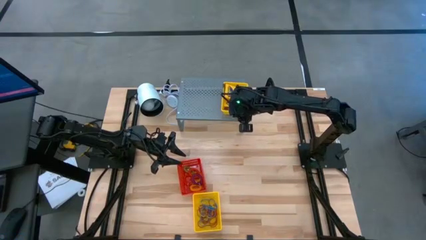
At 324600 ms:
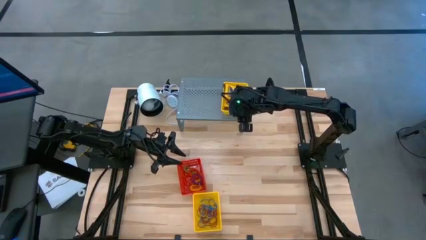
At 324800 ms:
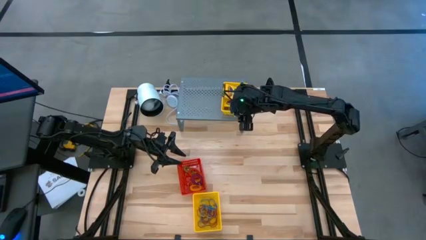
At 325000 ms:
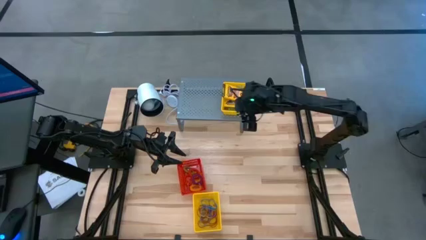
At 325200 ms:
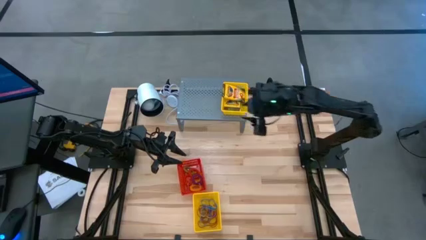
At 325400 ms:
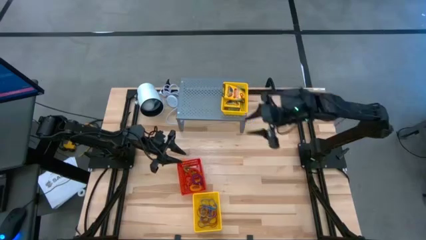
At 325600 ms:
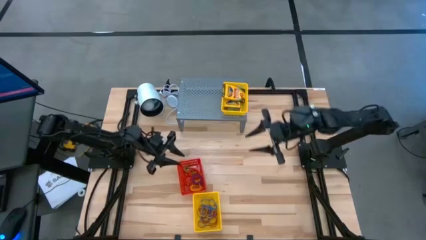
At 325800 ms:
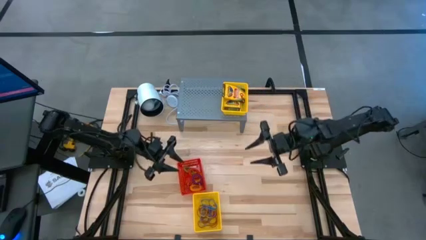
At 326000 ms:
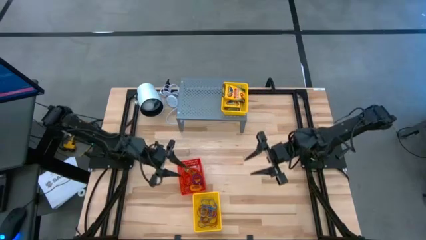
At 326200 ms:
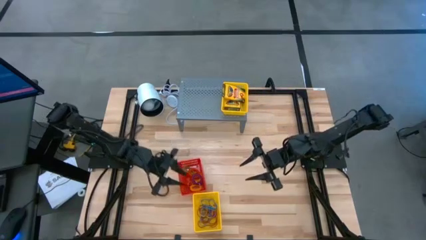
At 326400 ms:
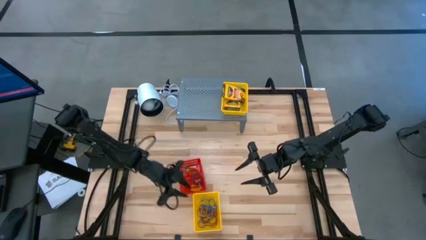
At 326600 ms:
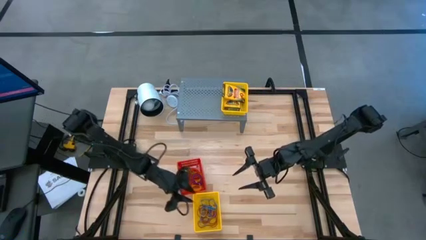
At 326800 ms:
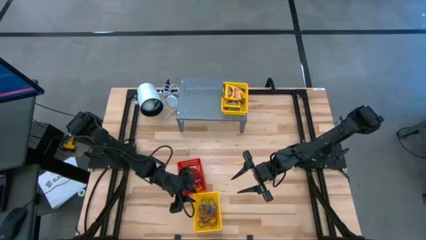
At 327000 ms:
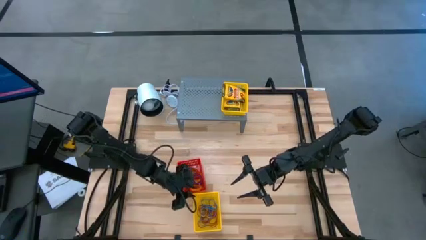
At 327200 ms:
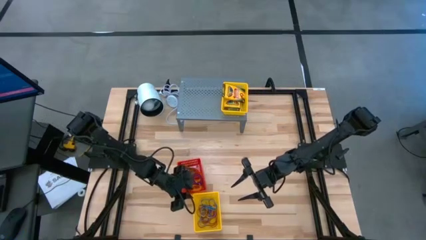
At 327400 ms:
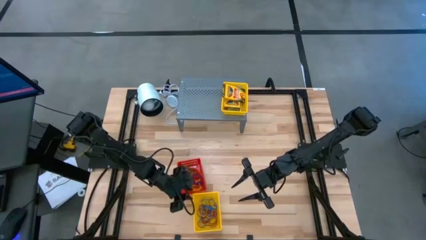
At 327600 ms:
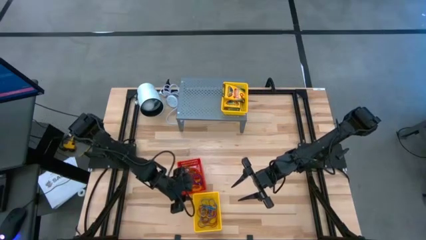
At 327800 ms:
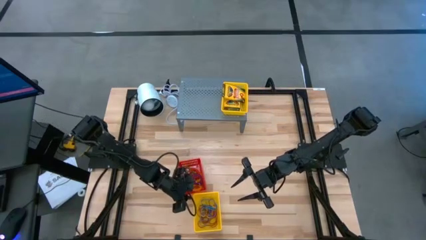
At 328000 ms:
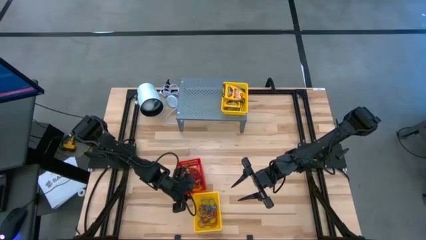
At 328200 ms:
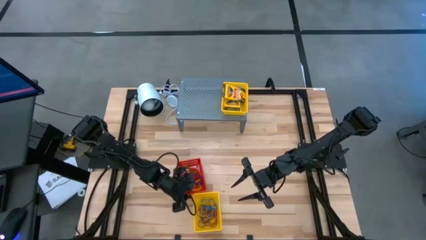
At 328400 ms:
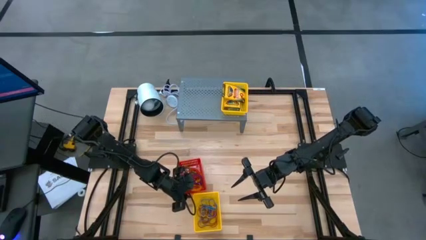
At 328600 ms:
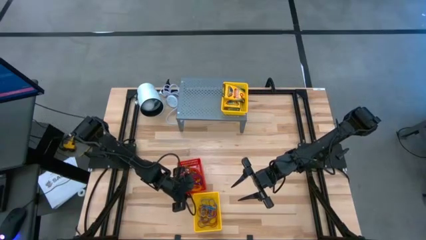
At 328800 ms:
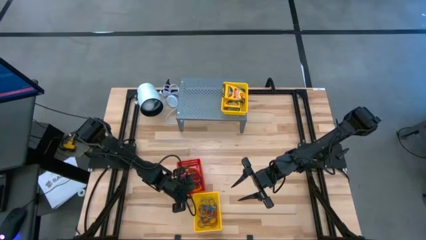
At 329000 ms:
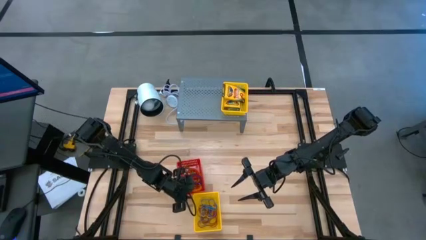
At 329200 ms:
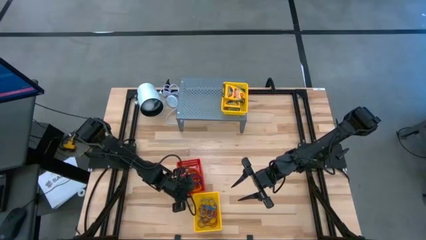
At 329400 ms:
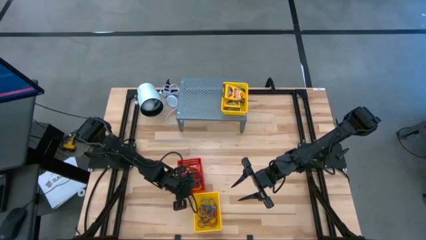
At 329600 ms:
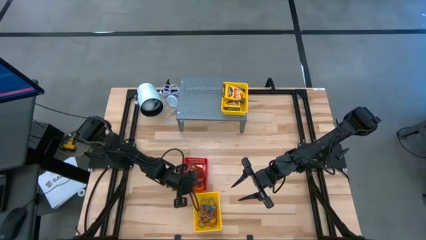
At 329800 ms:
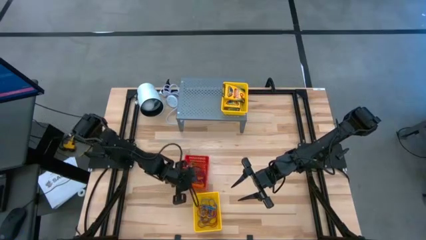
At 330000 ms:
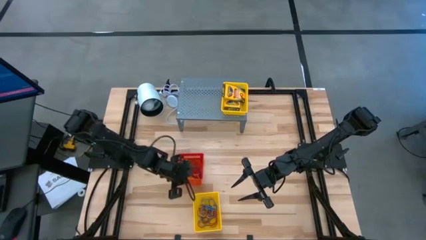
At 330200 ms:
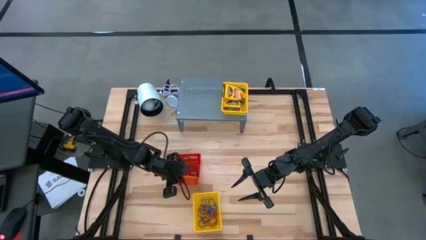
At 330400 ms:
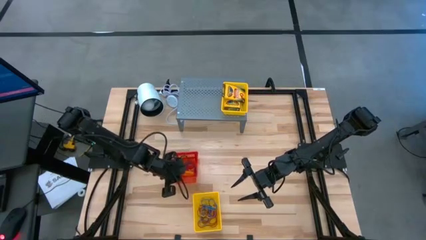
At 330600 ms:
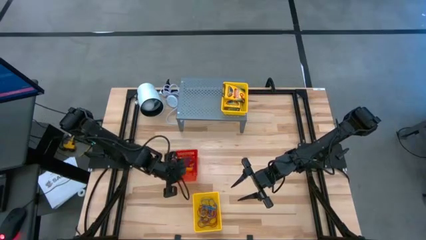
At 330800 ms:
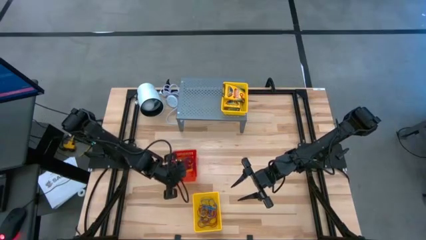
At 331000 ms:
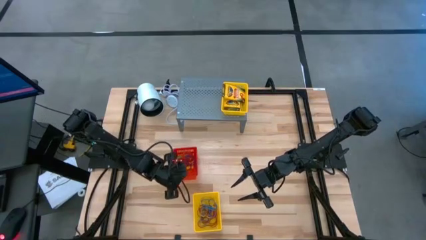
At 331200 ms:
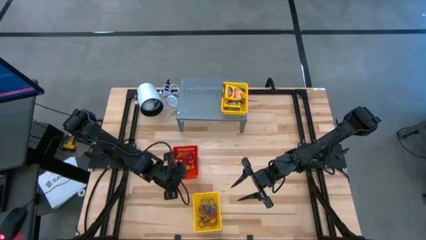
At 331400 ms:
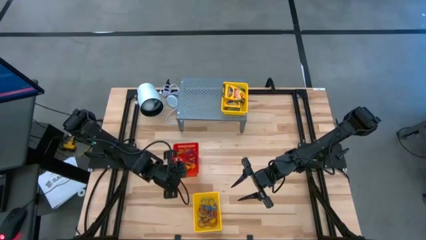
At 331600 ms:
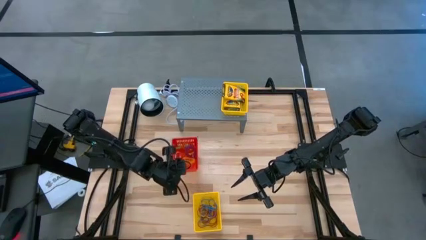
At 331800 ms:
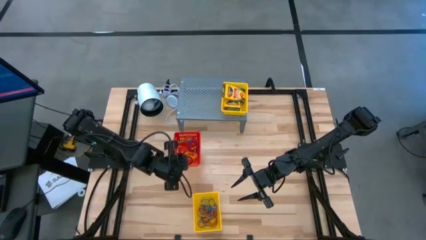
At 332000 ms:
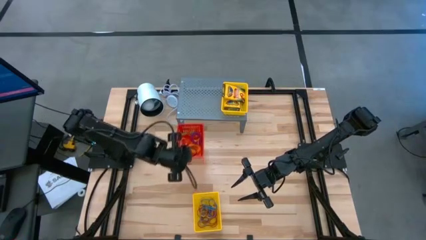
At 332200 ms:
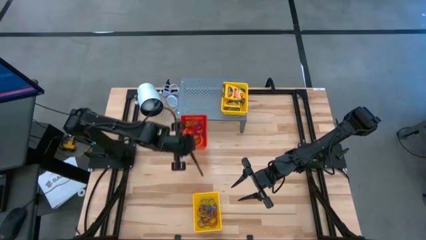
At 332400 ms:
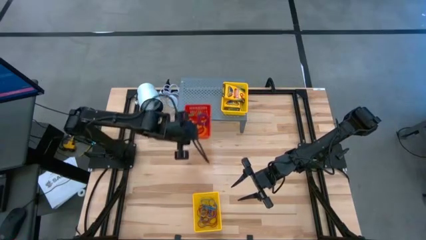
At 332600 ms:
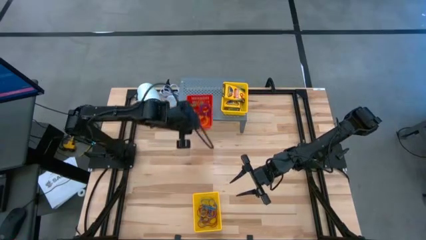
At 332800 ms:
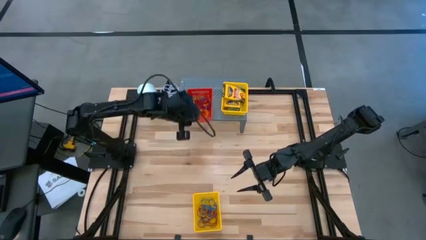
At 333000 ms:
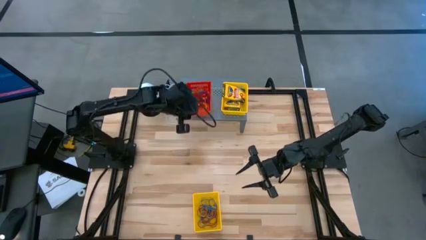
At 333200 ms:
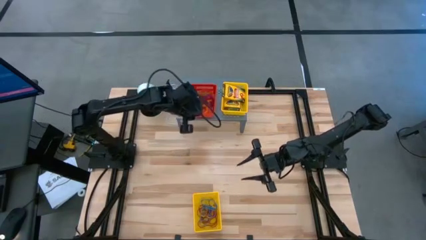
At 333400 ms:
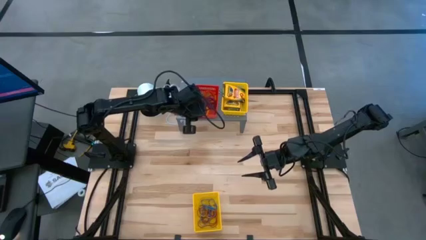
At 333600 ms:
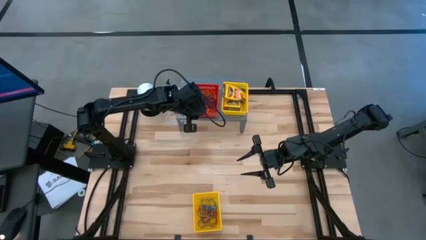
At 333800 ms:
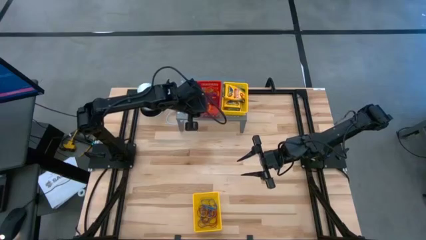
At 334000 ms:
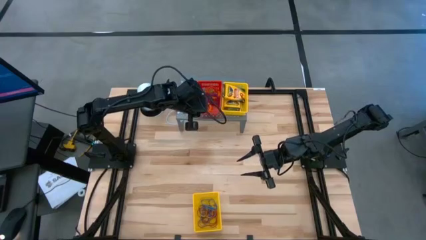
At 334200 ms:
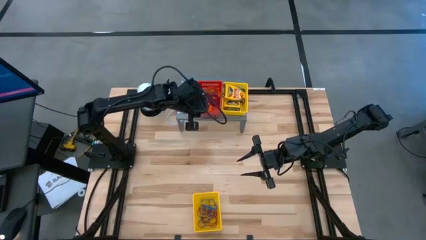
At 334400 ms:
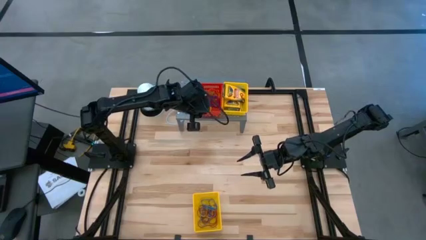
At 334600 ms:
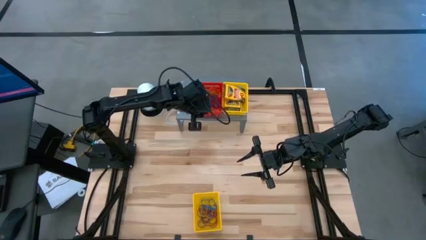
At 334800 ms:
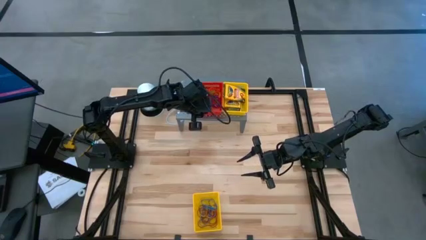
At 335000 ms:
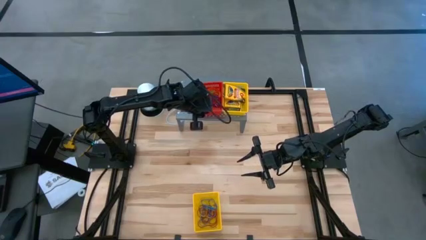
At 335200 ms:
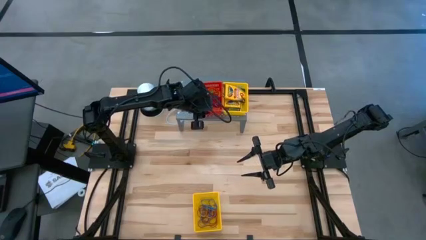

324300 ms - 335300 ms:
Task: Pick & Place Office Desk Supplies
Put the red bin on the shelf

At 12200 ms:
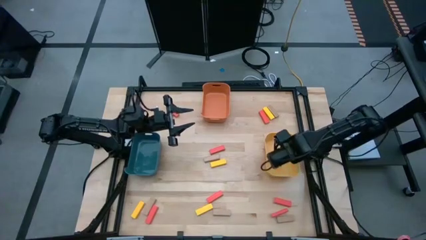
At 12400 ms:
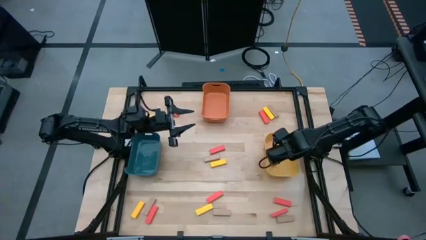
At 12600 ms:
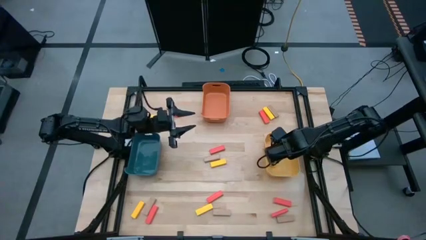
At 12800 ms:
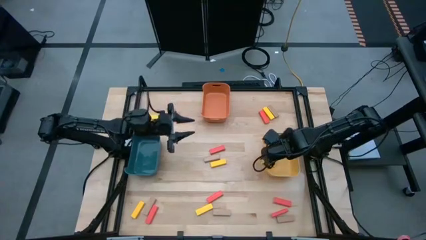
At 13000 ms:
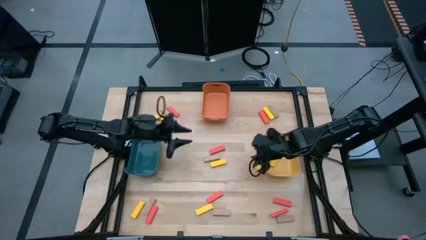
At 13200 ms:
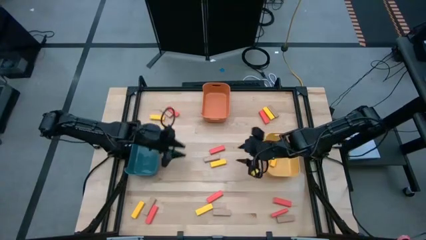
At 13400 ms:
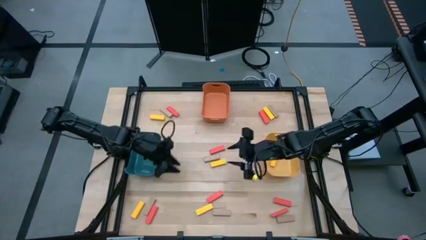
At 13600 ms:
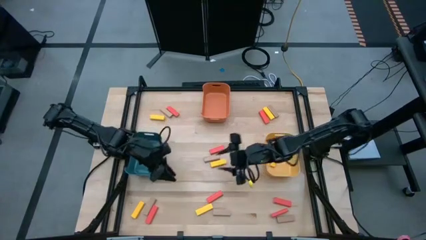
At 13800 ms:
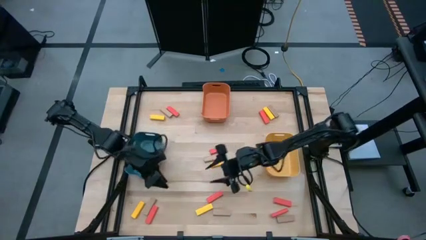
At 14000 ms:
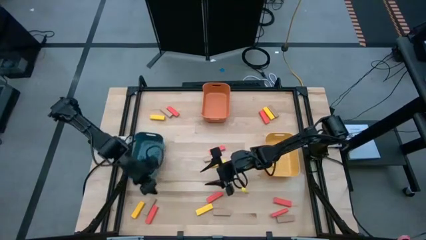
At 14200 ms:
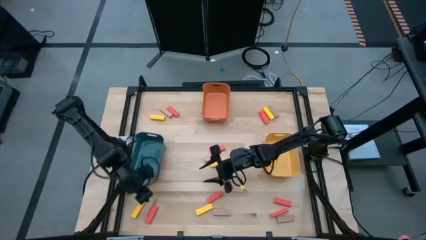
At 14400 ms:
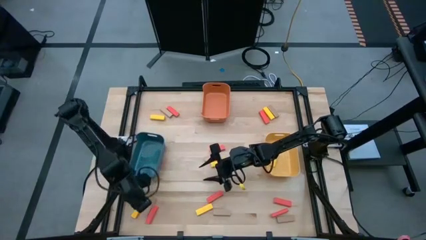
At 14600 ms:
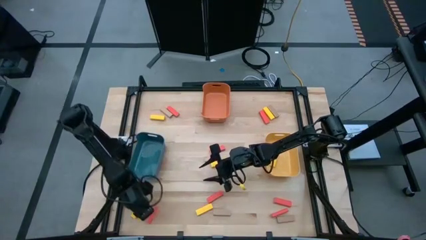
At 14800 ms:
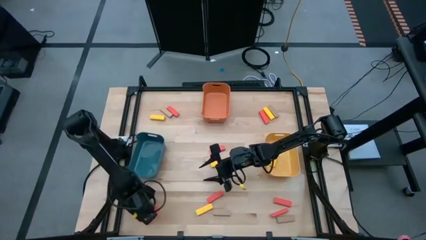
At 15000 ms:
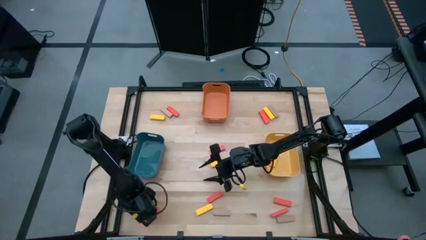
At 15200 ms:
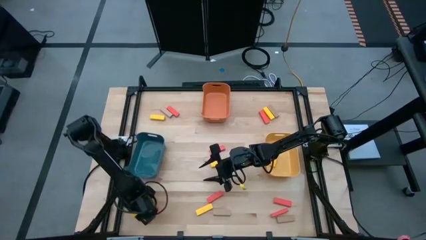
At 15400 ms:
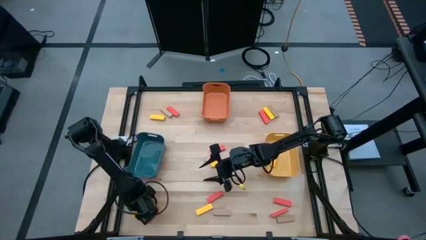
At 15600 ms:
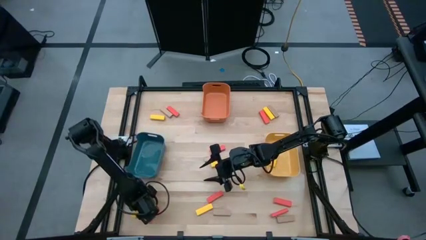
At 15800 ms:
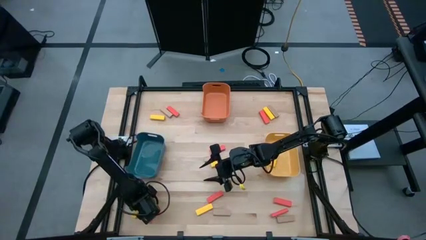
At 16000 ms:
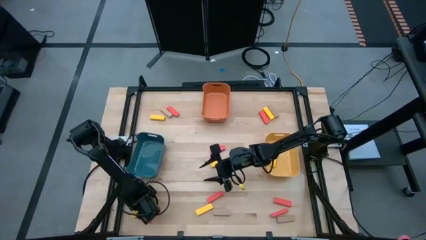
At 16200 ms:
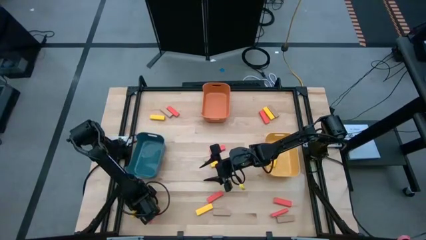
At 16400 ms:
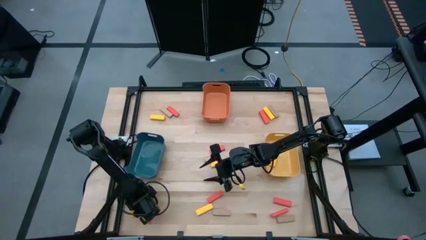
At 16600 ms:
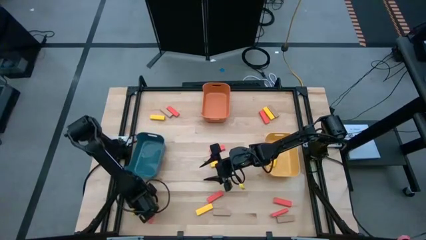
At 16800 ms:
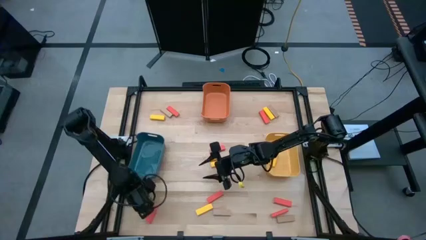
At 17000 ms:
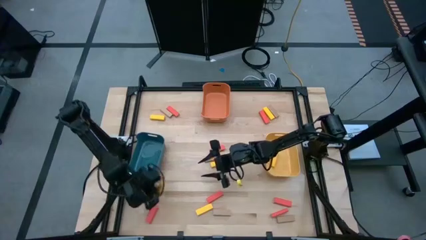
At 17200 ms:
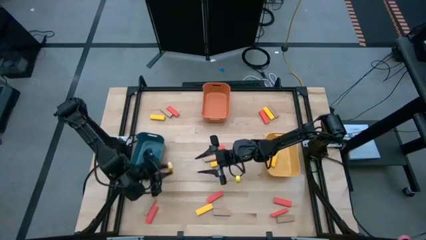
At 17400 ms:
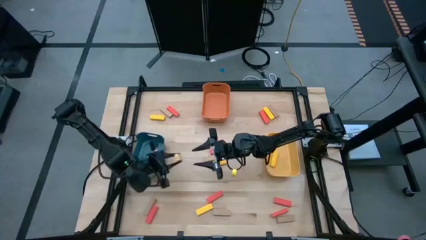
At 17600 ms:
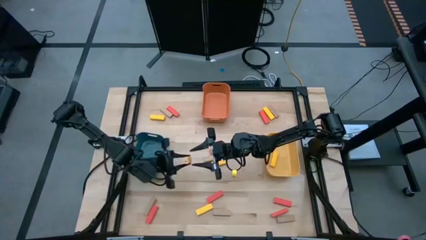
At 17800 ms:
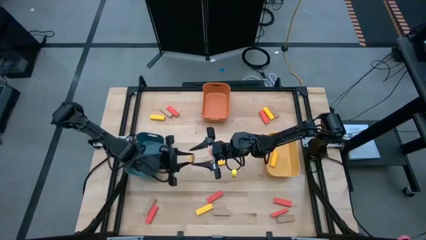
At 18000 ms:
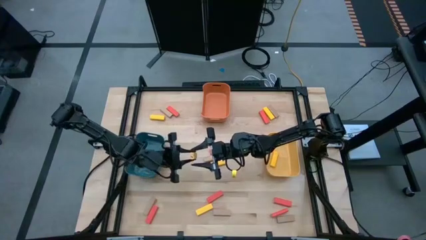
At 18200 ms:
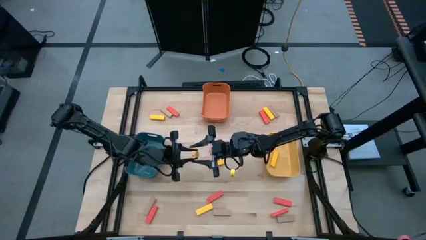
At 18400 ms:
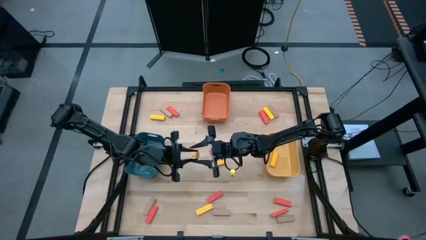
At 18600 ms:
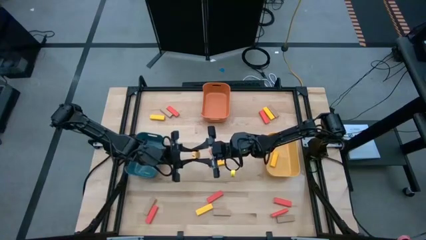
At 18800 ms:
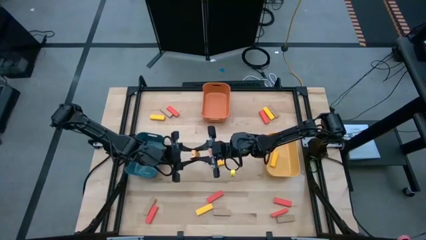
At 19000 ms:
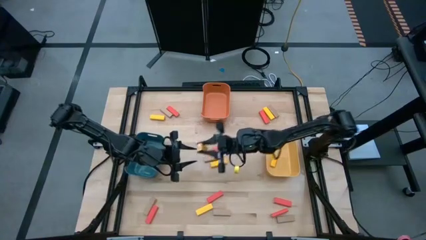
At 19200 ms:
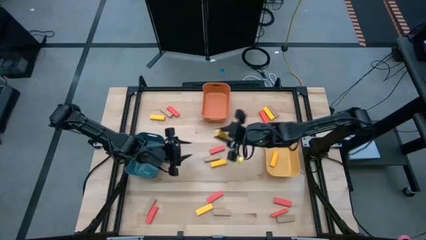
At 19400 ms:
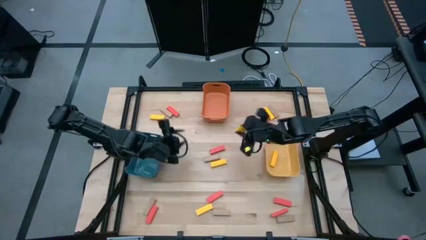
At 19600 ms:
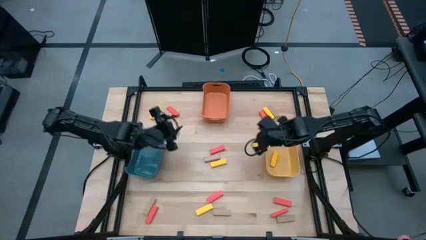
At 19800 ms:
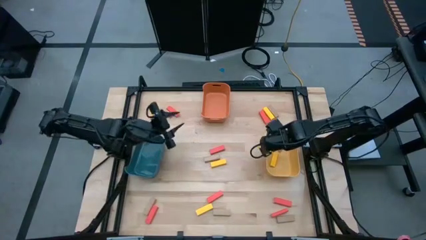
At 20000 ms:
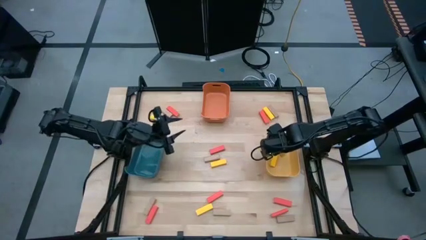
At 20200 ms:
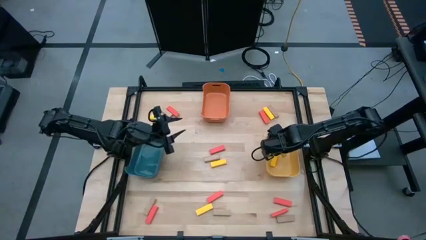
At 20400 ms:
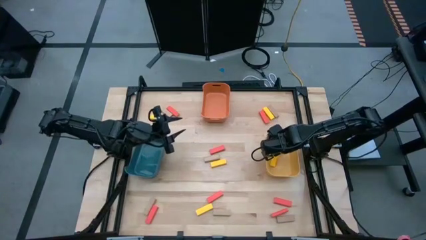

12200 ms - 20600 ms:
Task: Sort blocks
Put the bottom left yellow block into the yellow bin
